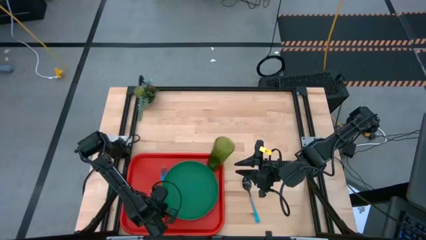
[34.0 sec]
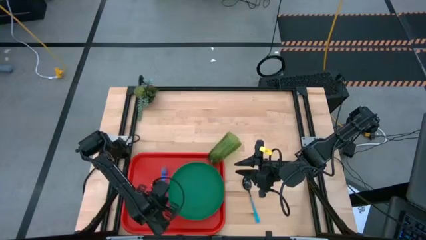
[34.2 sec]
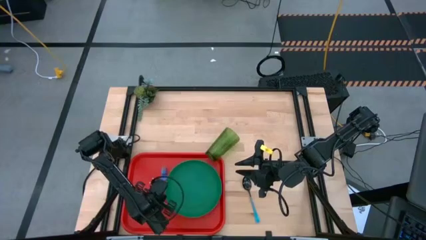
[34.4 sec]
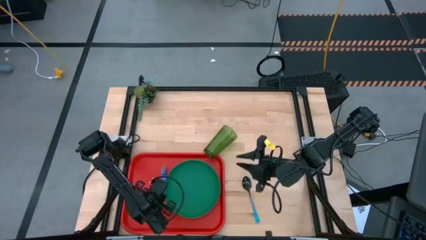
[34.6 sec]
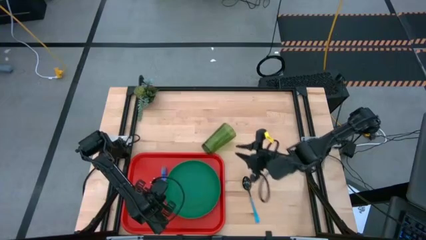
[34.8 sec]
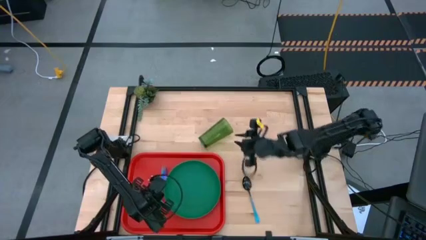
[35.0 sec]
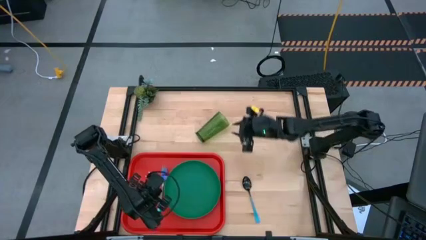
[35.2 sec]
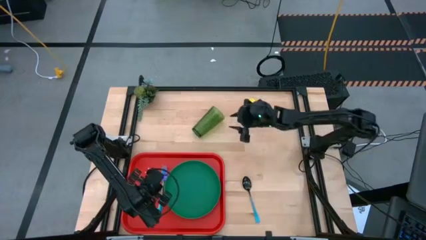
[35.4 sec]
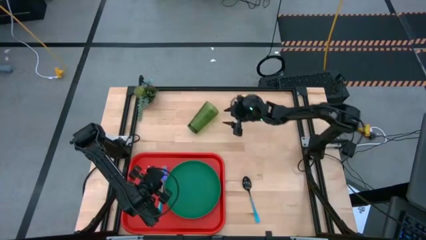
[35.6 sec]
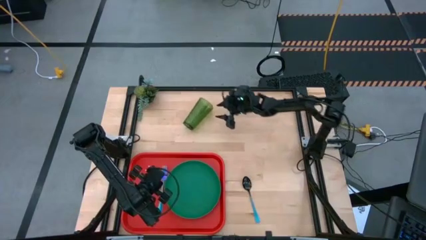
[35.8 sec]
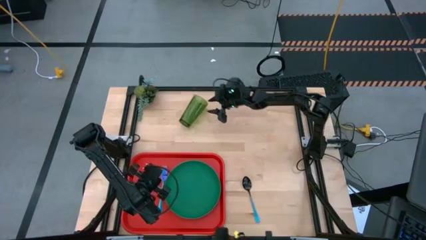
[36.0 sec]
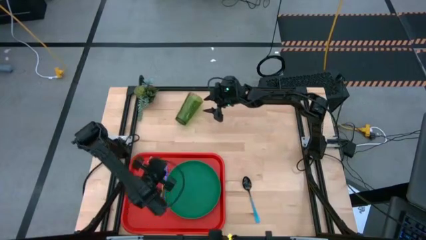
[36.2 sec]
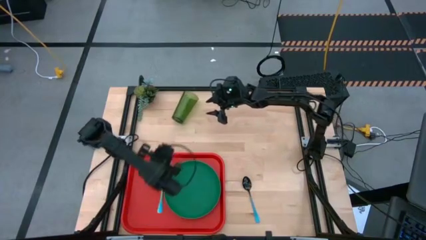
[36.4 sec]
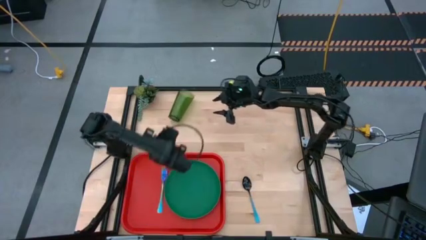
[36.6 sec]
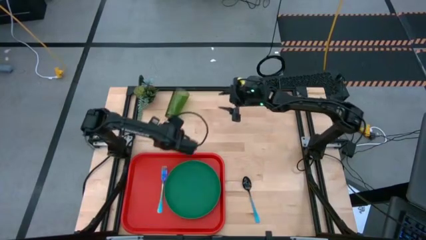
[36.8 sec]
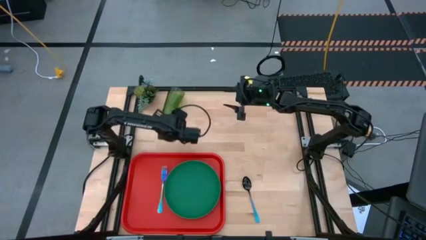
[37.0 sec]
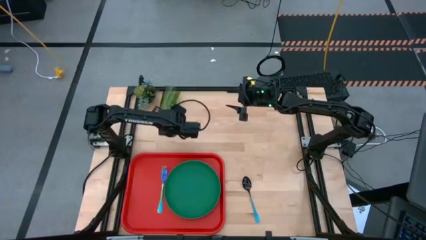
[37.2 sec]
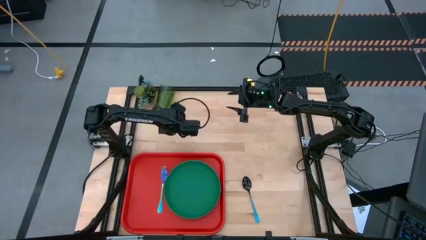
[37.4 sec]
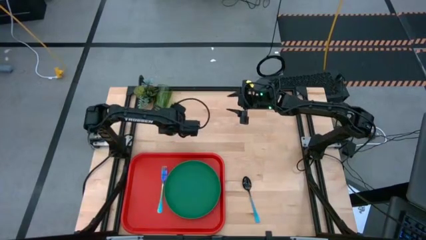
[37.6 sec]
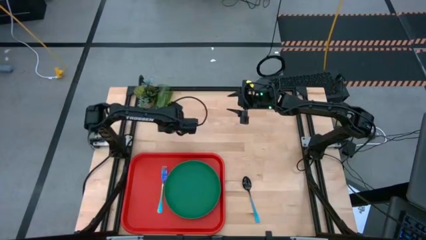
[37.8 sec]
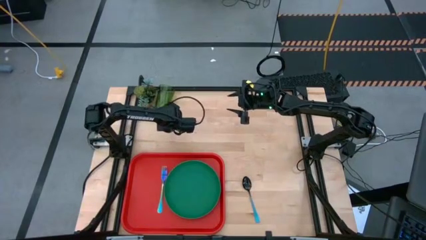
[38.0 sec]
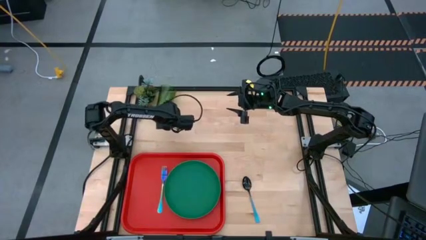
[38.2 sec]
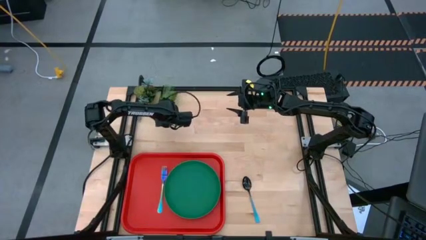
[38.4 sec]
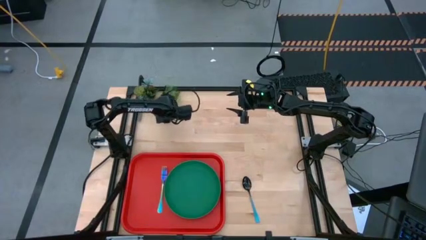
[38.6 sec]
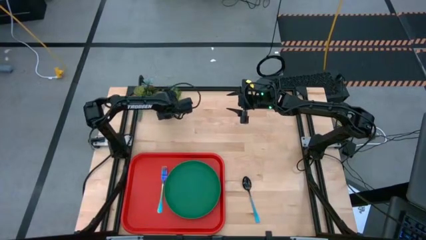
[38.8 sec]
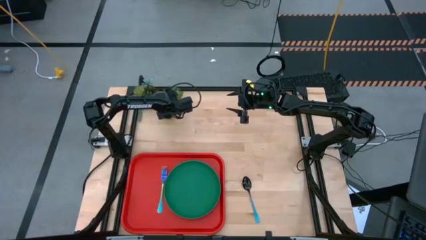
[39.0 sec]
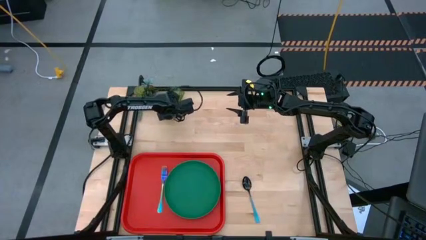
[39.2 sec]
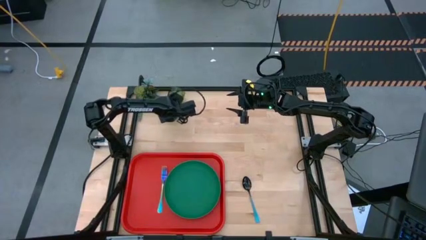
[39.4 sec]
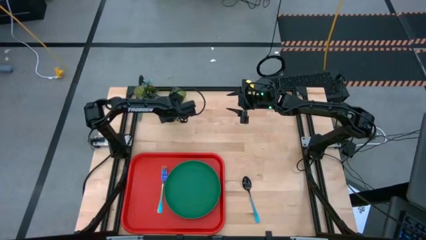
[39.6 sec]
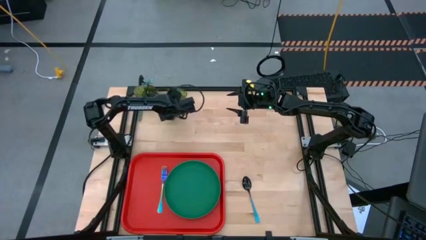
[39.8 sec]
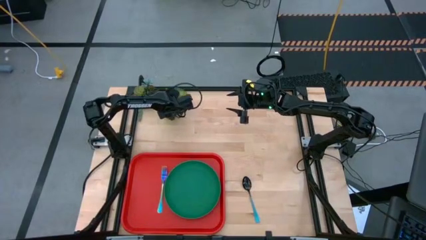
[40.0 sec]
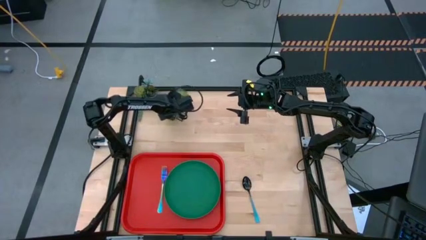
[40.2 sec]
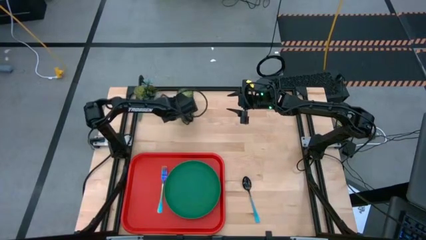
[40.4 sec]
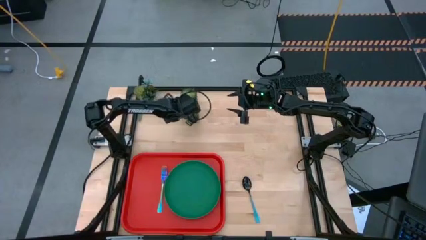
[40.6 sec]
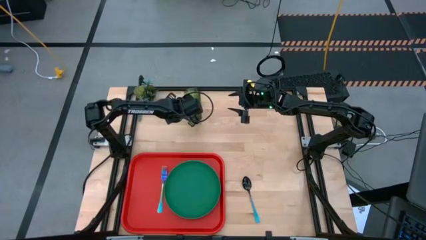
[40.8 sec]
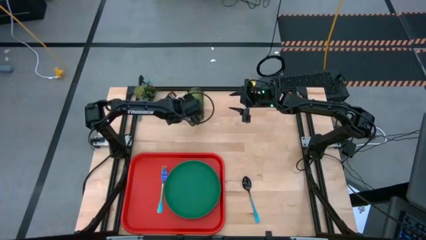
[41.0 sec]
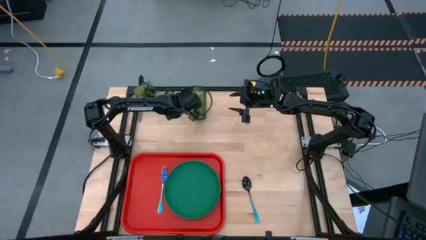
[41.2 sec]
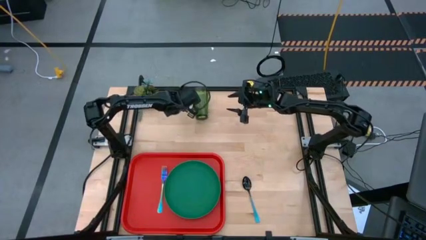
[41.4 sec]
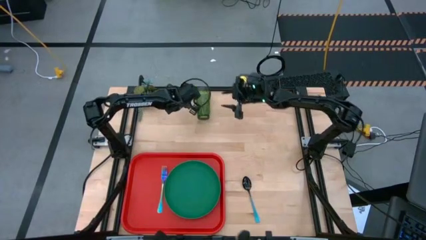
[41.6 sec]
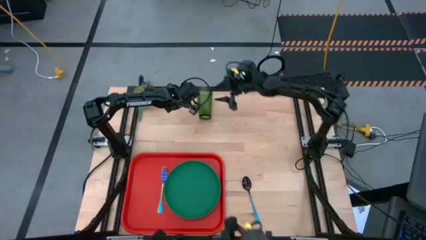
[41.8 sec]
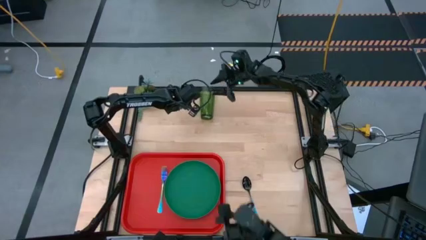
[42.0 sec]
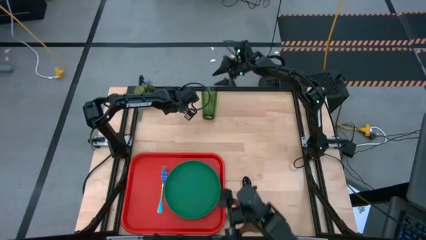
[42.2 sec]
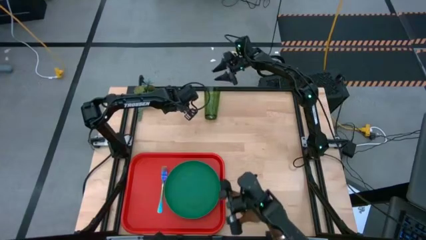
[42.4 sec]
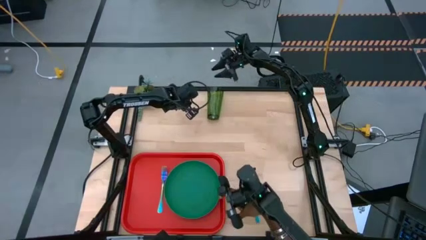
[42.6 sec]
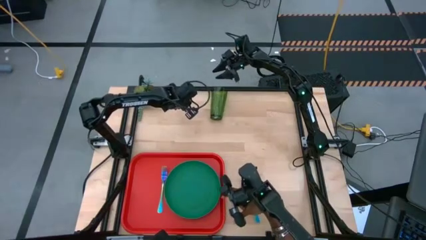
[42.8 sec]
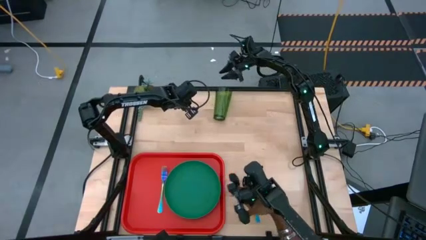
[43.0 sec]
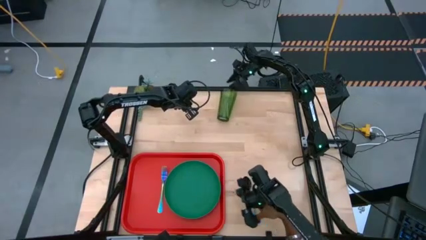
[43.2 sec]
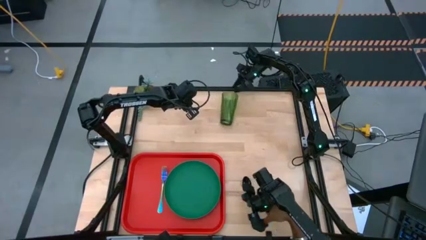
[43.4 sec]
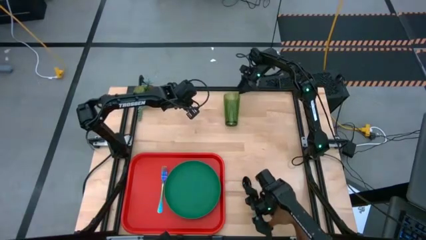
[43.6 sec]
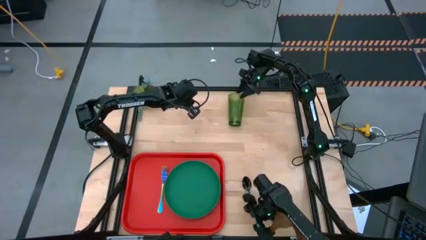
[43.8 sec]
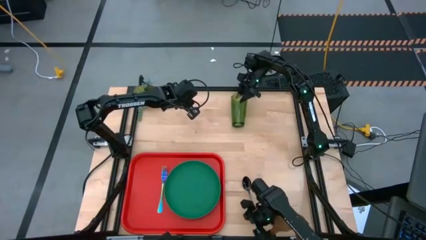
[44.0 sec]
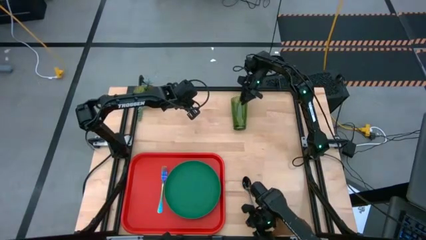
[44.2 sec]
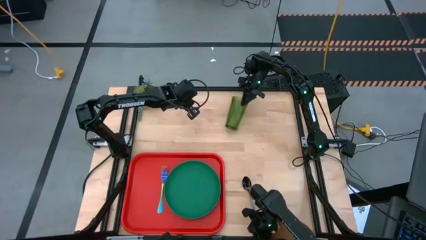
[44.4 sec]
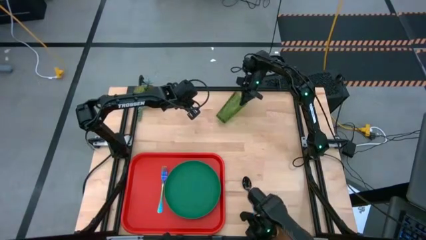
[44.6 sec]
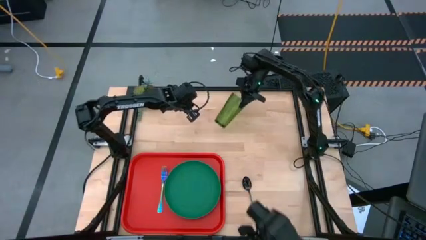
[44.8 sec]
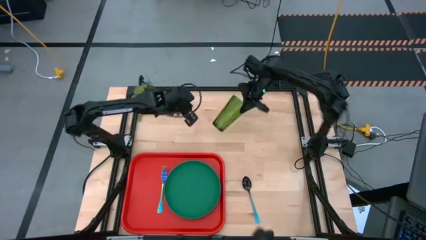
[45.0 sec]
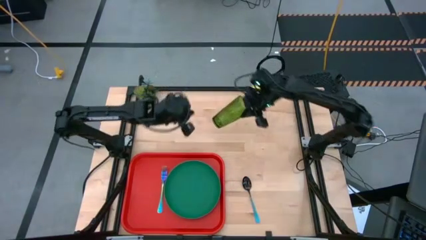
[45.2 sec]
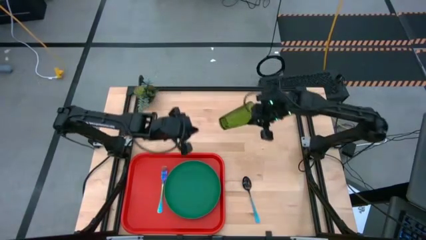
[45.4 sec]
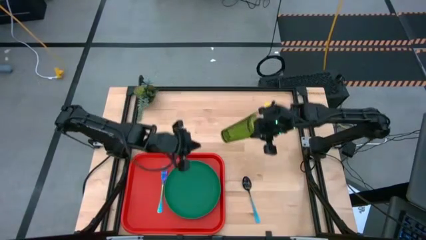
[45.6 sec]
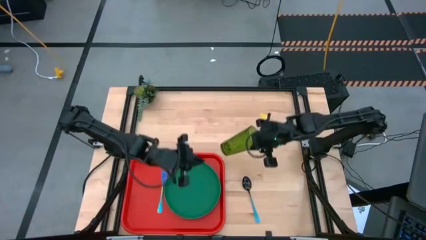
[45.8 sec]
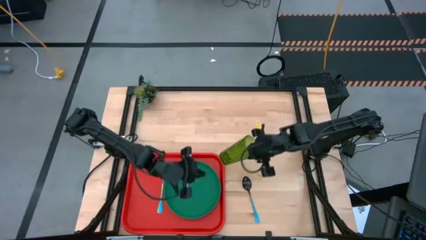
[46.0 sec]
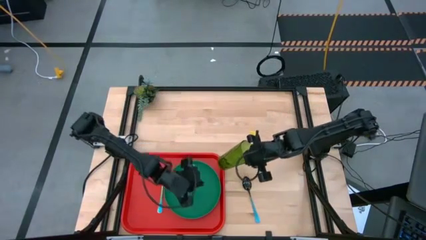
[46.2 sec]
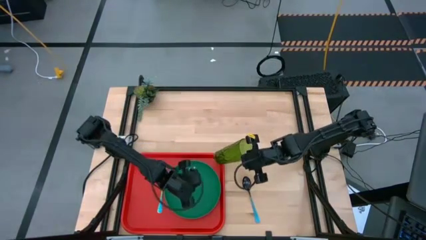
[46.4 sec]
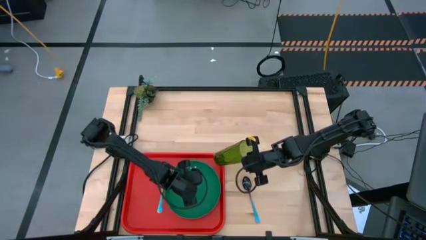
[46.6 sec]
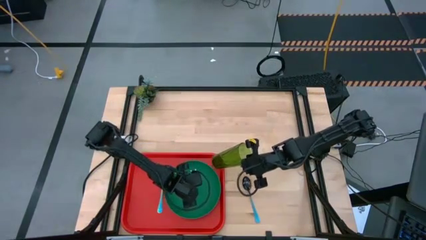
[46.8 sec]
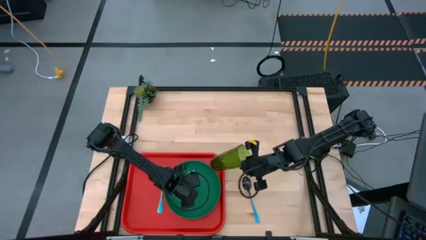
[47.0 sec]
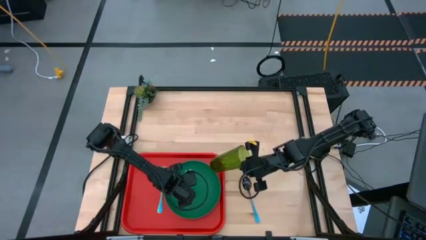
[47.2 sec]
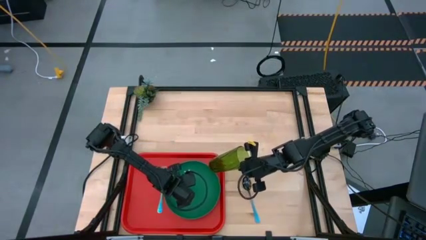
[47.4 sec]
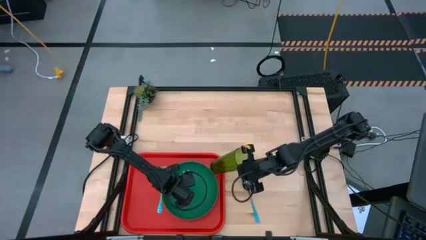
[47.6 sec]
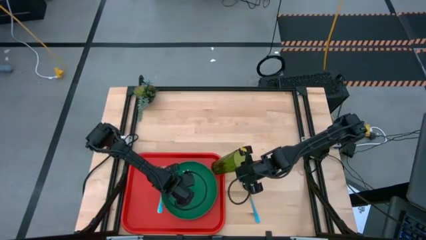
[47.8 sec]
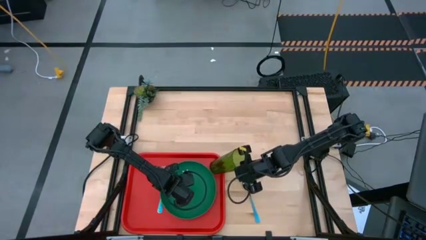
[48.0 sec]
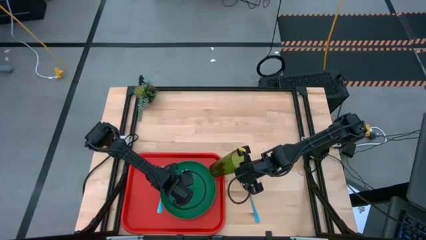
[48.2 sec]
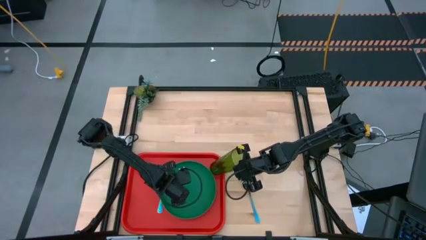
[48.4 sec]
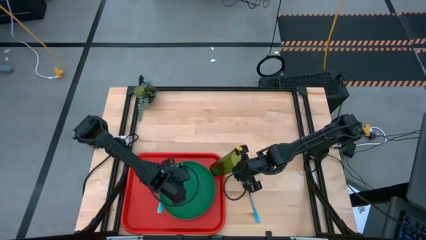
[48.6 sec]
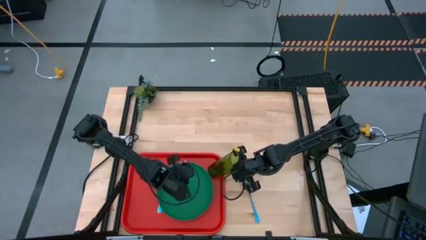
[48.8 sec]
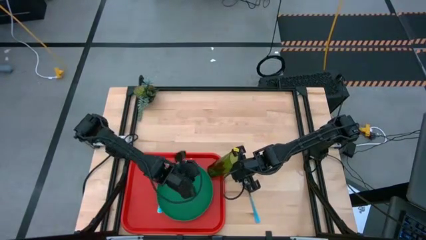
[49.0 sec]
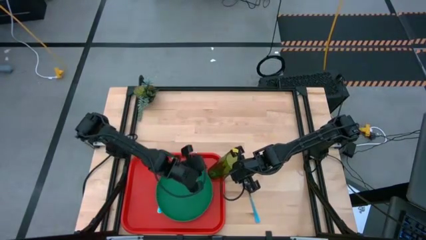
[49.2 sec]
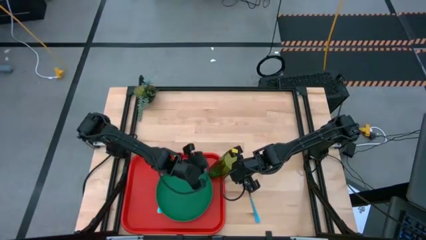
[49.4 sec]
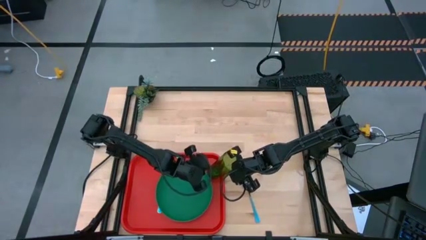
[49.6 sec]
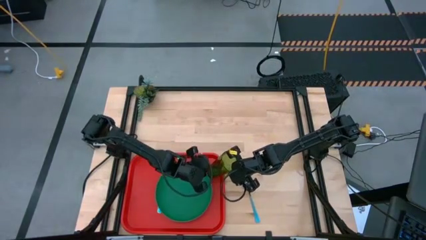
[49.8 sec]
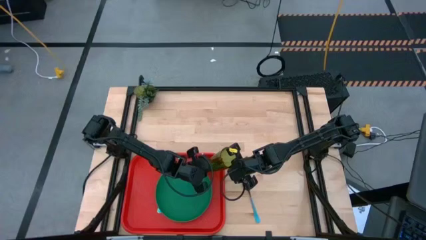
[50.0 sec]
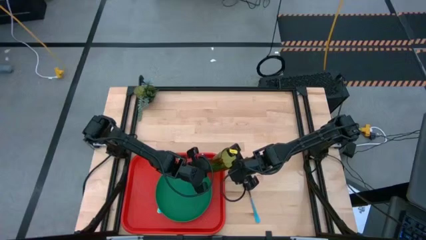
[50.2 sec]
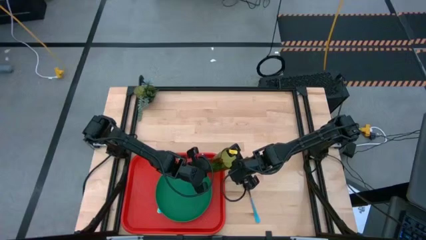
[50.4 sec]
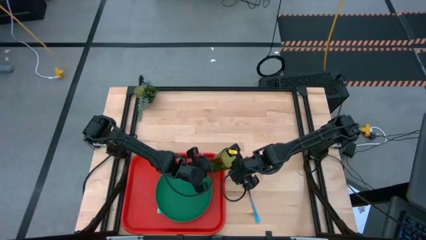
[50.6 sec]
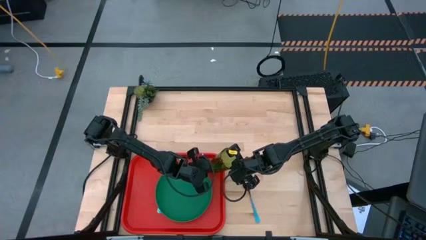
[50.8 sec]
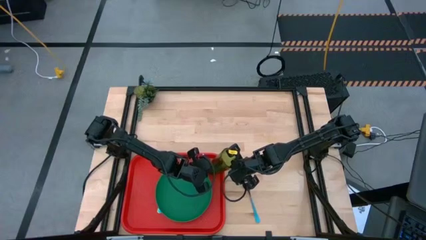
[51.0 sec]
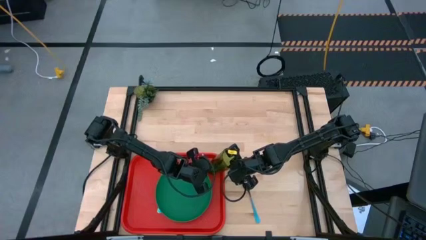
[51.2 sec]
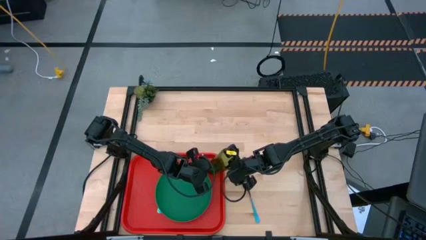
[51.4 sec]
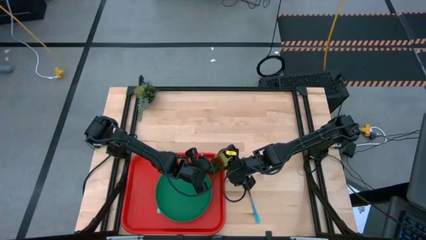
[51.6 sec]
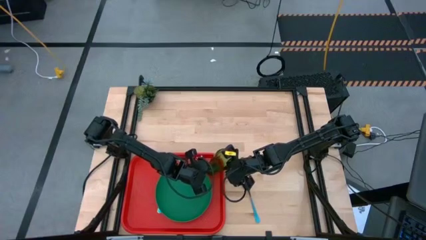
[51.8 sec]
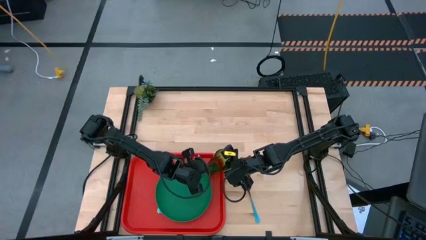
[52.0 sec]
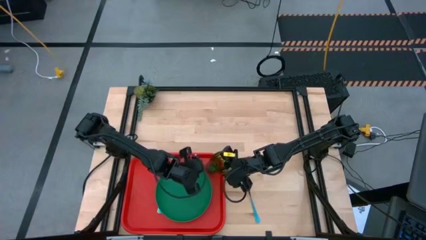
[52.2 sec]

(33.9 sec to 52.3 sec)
Task: Pick and place plate/cup/fork/spoon on tray
Put the green cup on the red tray
